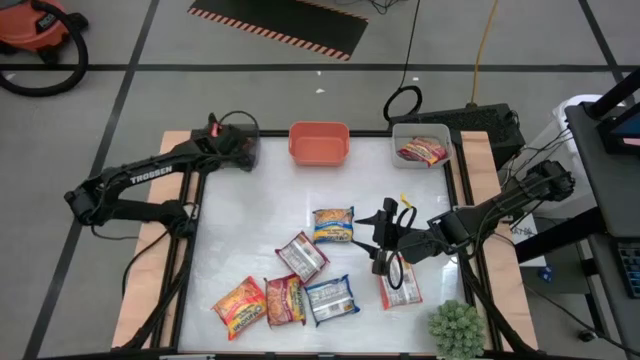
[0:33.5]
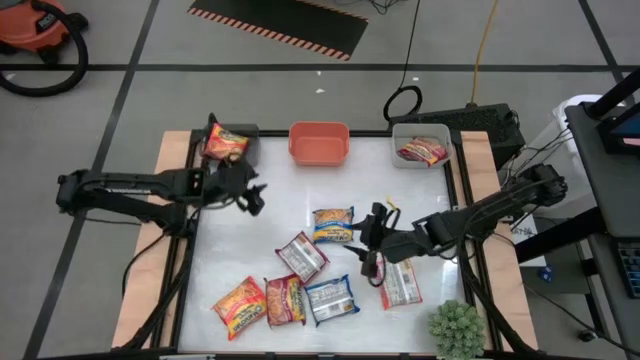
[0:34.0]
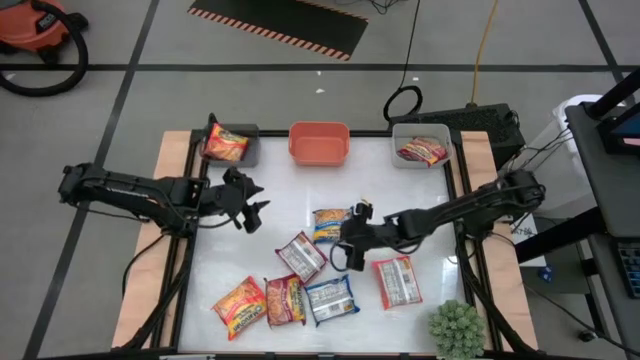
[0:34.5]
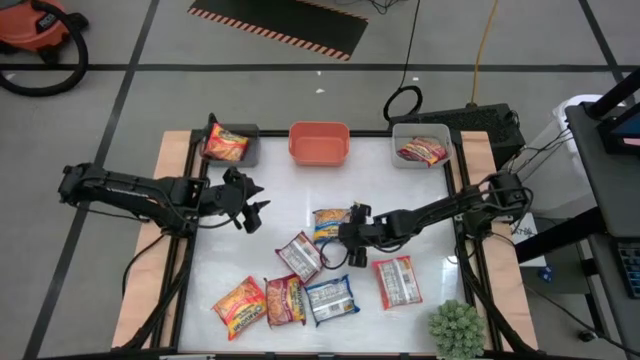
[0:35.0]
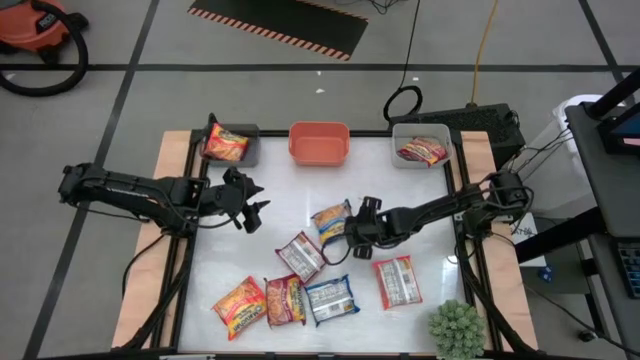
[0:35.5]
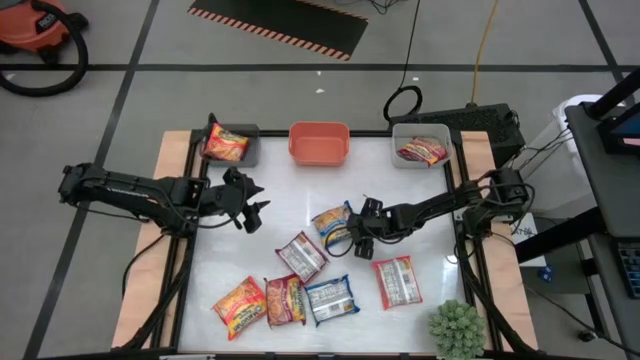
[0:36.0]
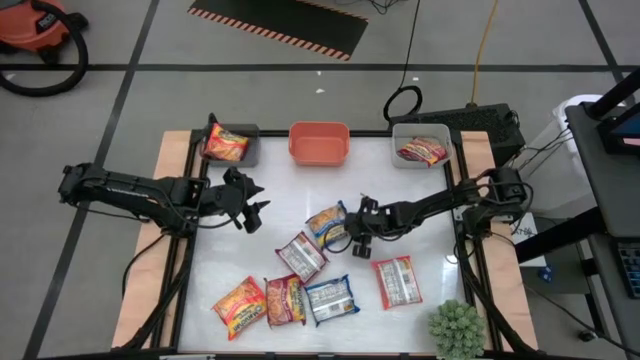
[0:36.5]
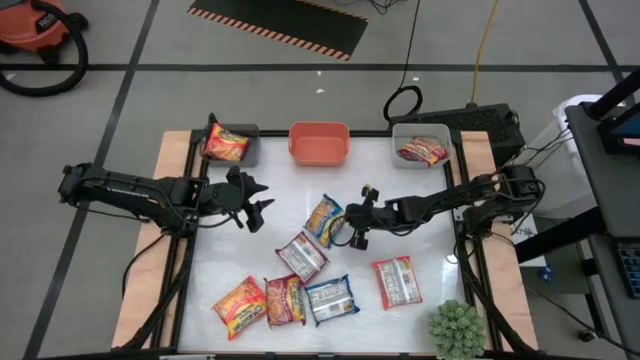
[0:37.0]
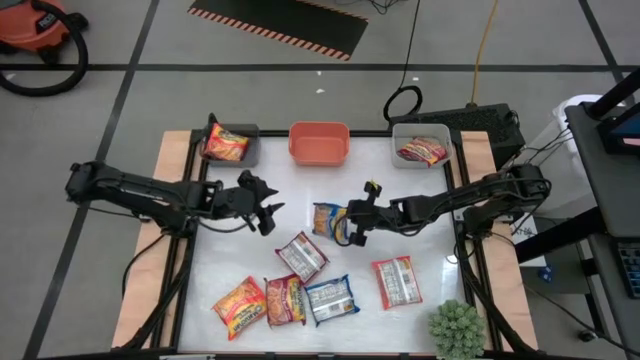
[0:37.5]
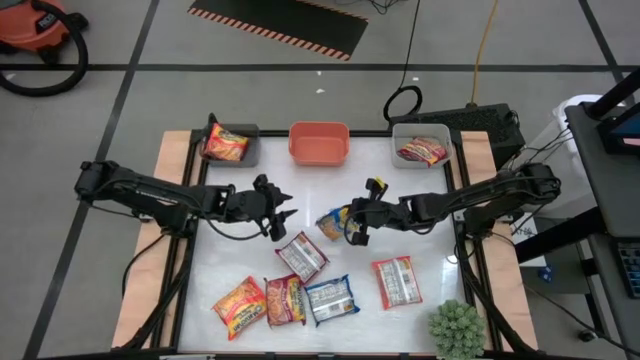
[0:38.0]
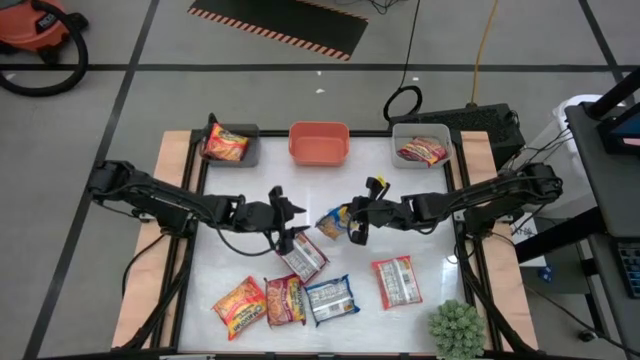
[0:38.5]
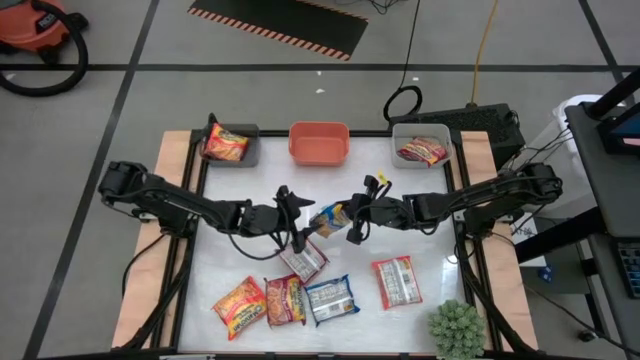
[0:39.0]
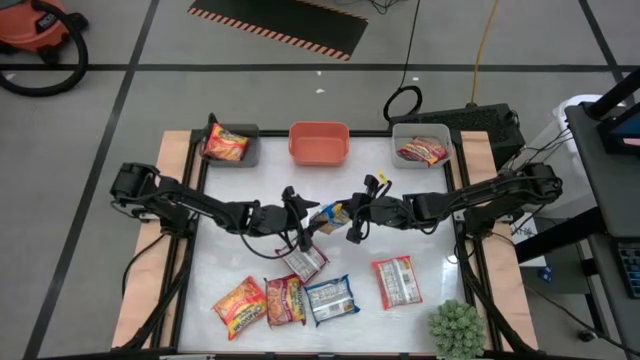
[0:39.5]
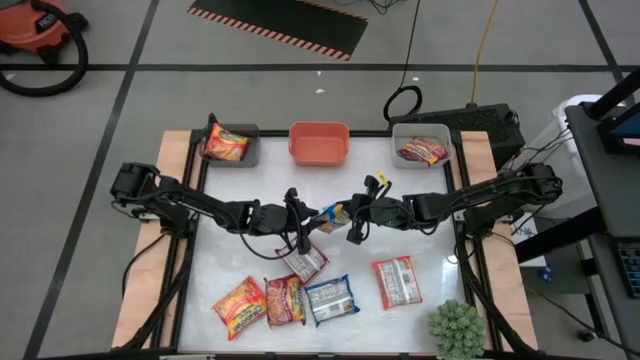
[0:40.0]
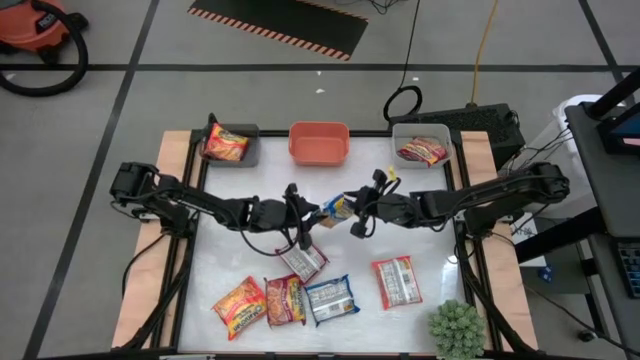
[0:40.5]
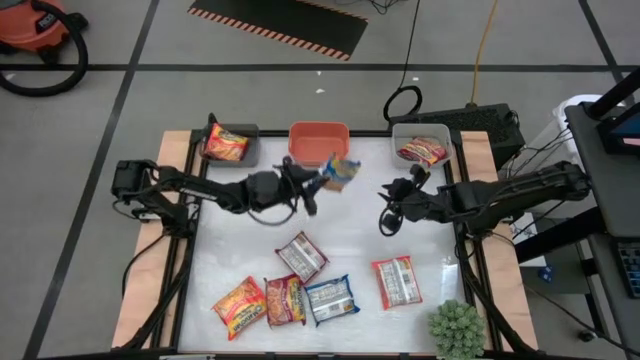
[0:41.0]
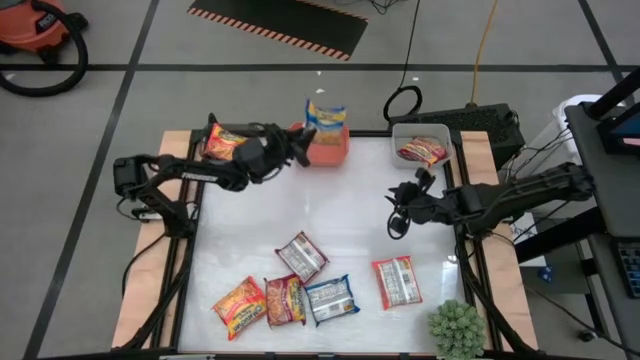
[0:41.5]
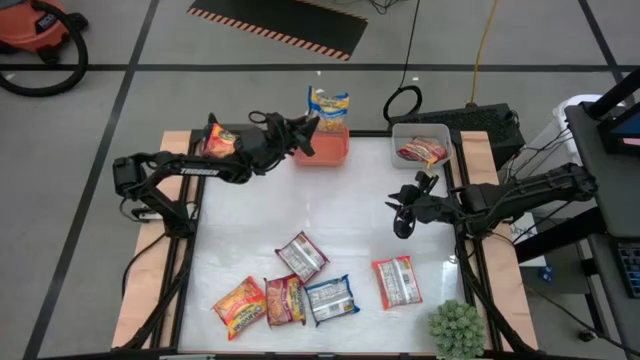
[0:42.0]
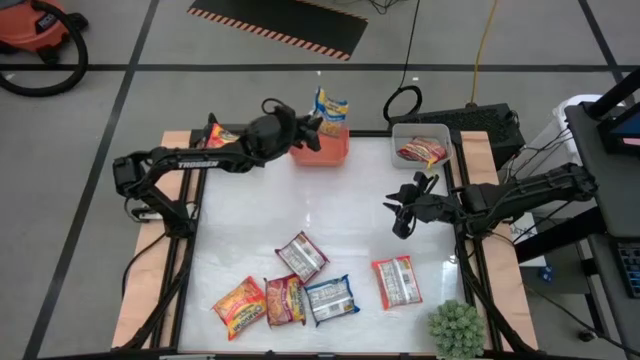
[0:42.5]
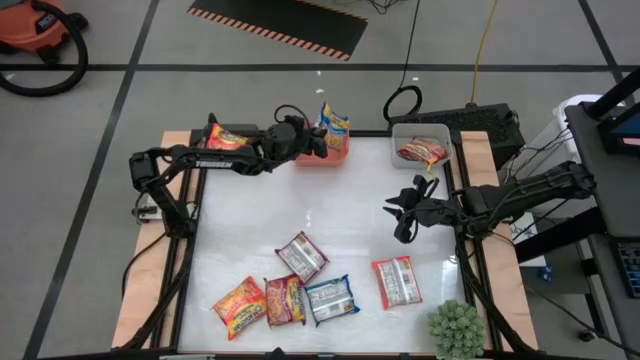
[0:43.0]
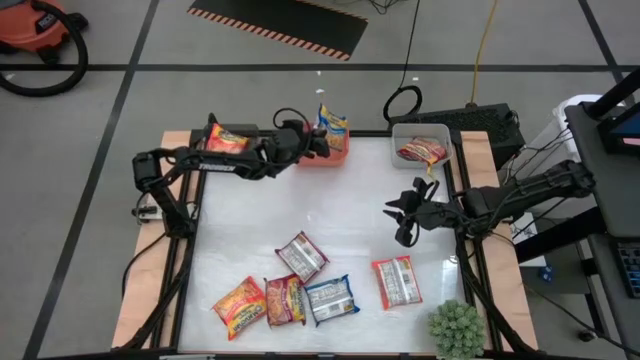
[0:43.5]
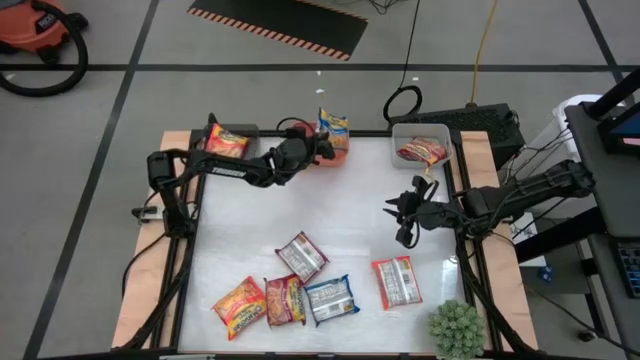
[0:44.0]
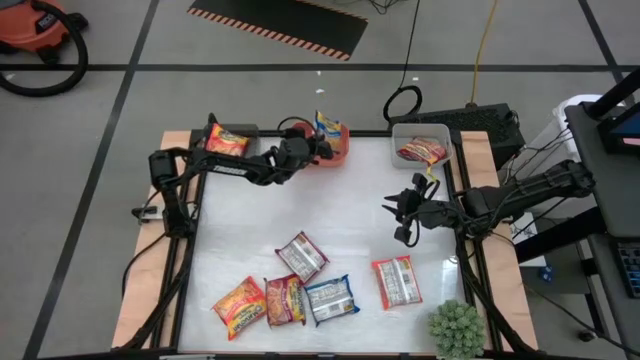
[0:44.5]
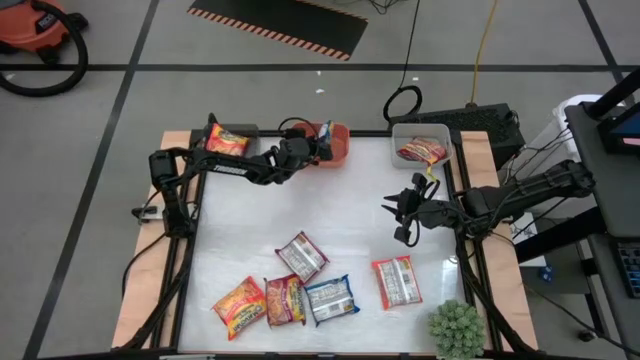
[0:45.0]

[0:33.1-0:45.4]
Task: Sort Maruchan noodles
Put the top blue noodle pack into the orange bin
